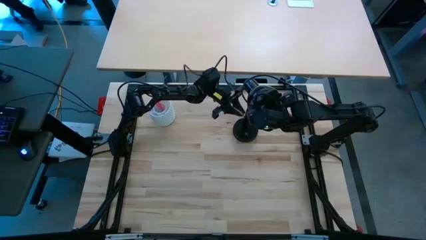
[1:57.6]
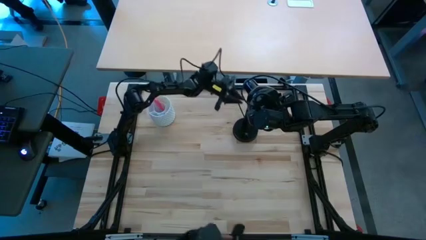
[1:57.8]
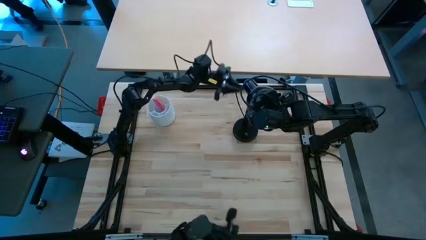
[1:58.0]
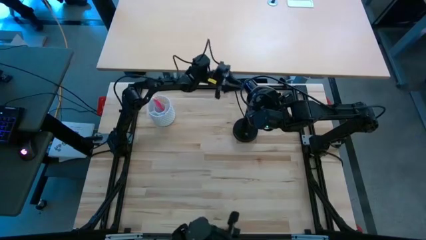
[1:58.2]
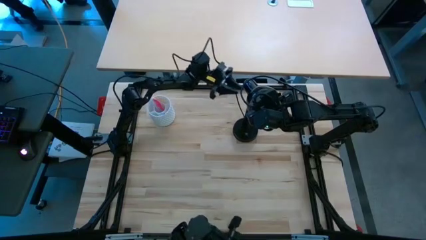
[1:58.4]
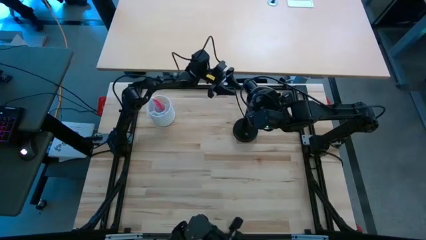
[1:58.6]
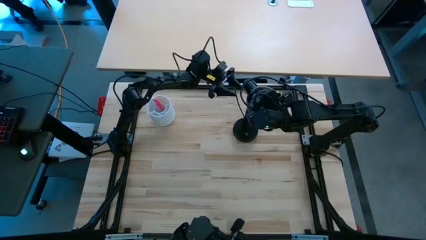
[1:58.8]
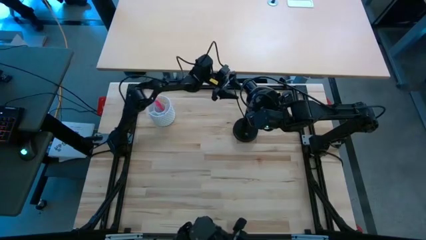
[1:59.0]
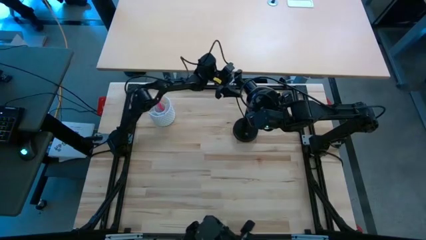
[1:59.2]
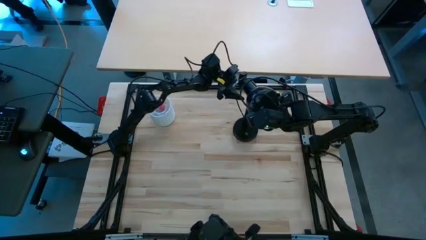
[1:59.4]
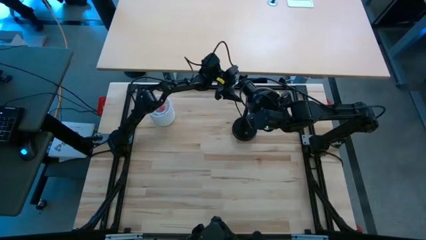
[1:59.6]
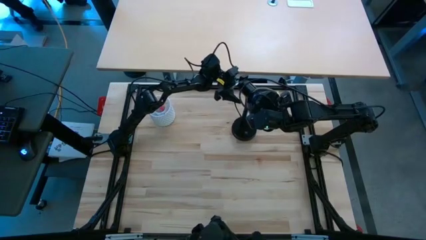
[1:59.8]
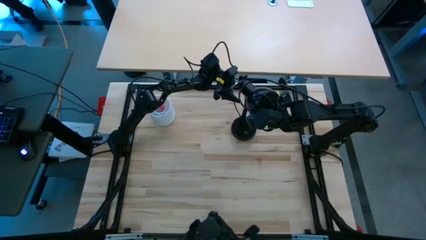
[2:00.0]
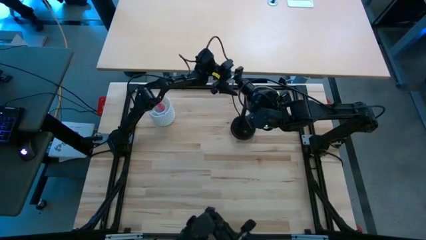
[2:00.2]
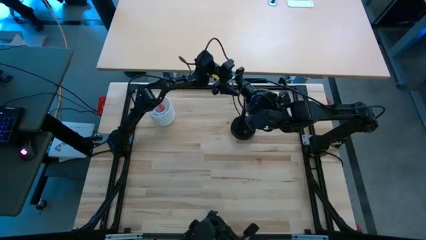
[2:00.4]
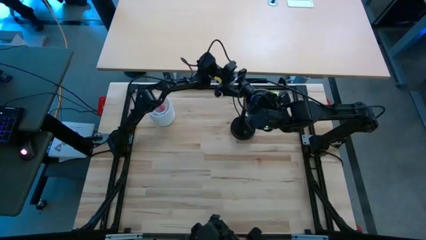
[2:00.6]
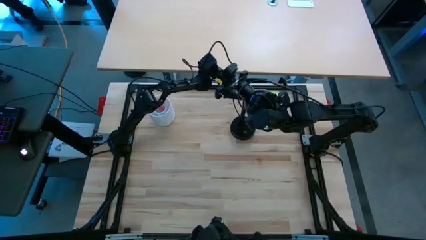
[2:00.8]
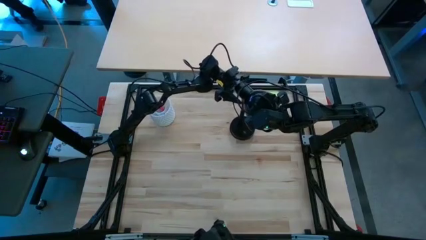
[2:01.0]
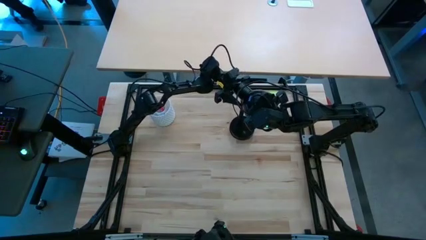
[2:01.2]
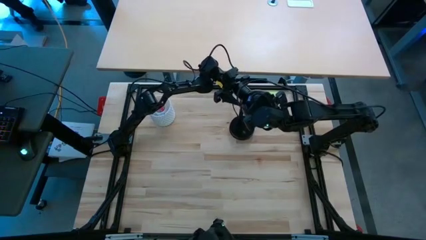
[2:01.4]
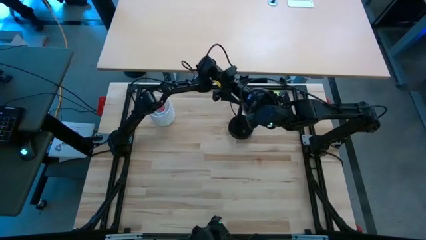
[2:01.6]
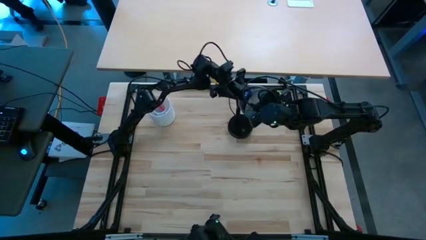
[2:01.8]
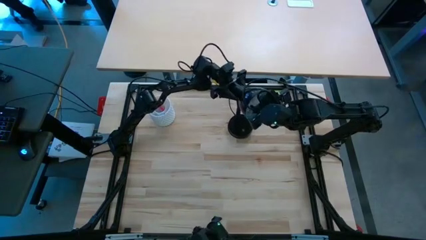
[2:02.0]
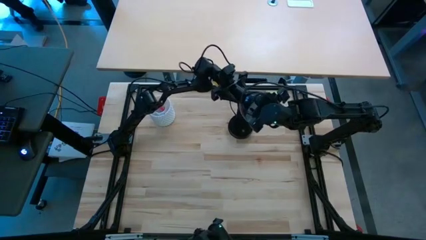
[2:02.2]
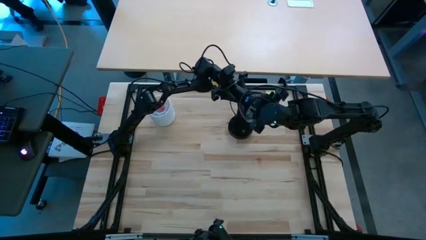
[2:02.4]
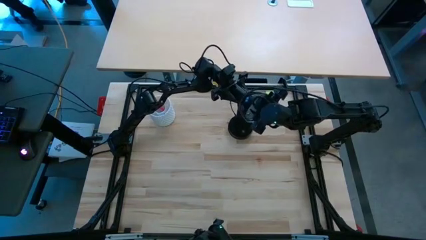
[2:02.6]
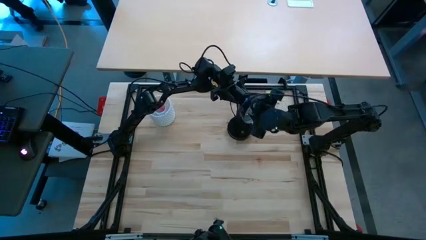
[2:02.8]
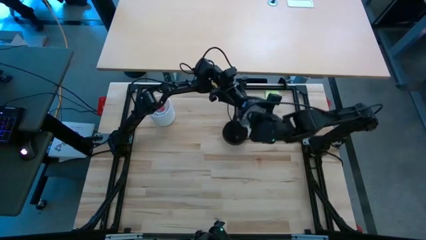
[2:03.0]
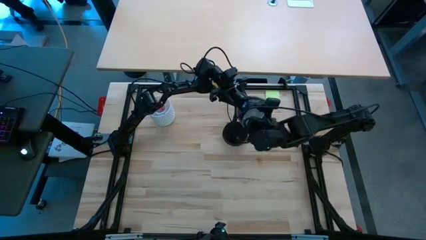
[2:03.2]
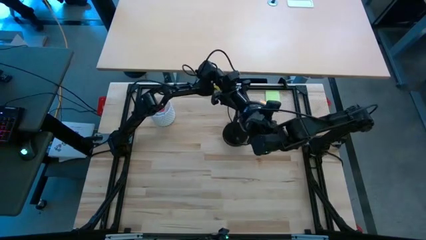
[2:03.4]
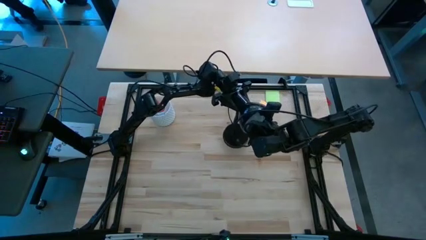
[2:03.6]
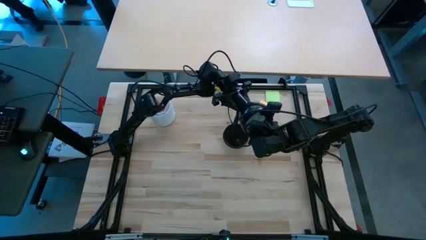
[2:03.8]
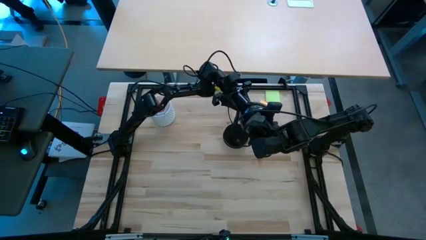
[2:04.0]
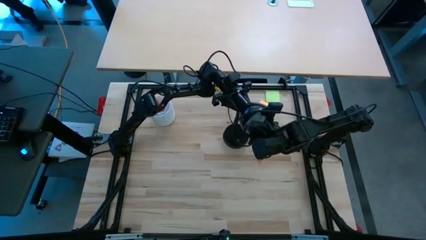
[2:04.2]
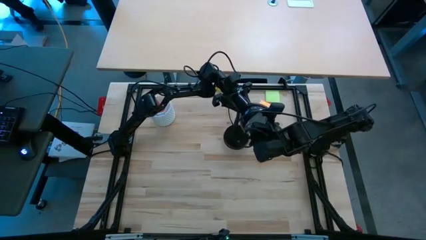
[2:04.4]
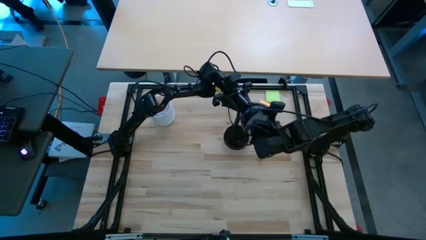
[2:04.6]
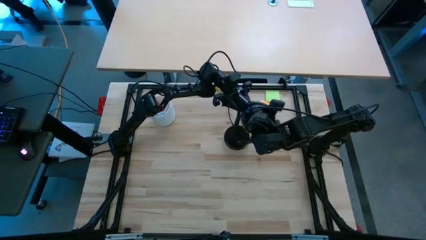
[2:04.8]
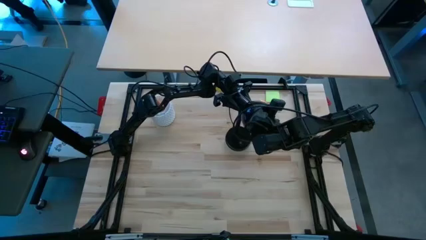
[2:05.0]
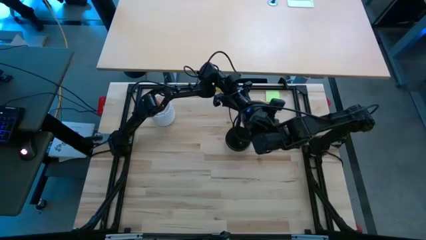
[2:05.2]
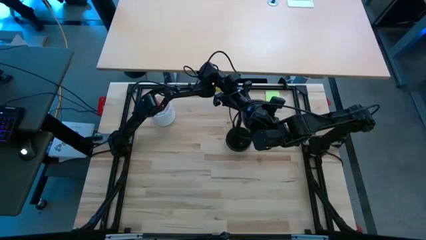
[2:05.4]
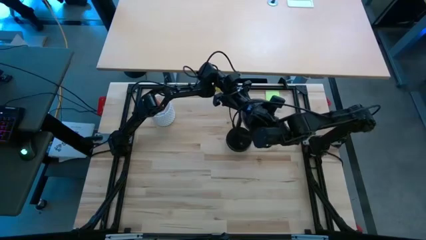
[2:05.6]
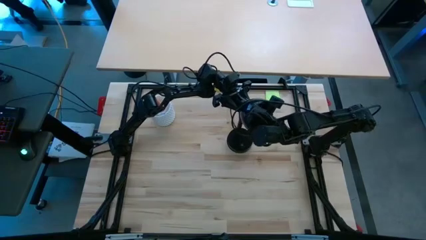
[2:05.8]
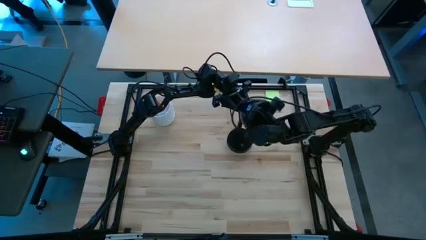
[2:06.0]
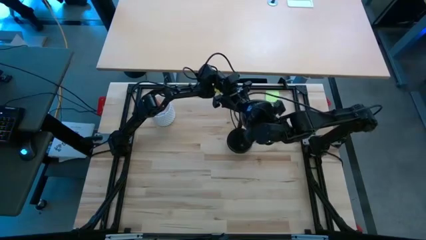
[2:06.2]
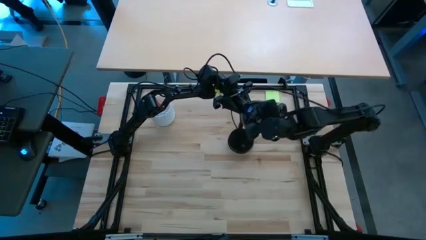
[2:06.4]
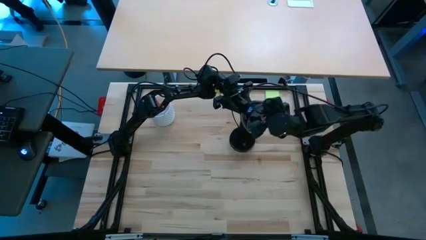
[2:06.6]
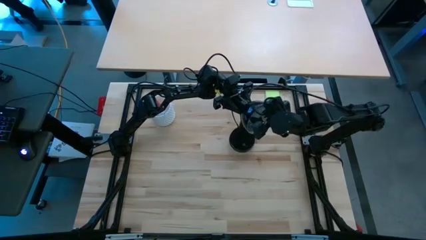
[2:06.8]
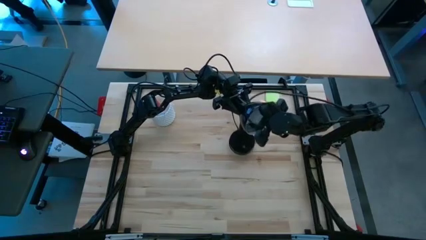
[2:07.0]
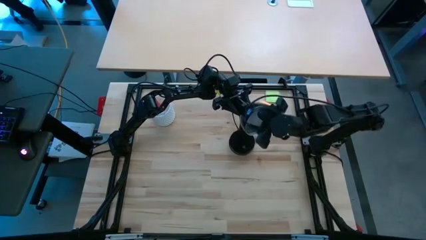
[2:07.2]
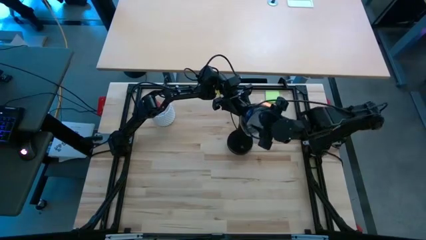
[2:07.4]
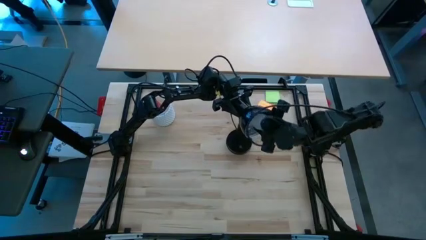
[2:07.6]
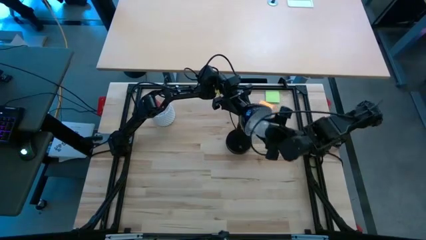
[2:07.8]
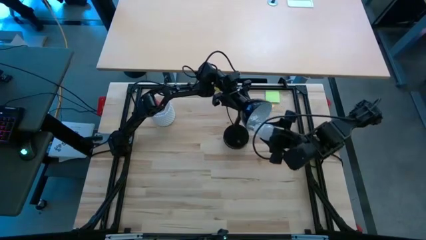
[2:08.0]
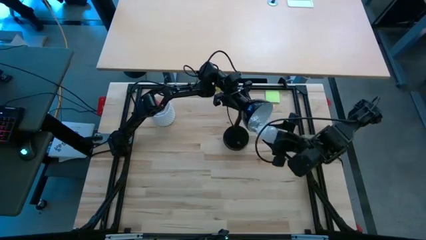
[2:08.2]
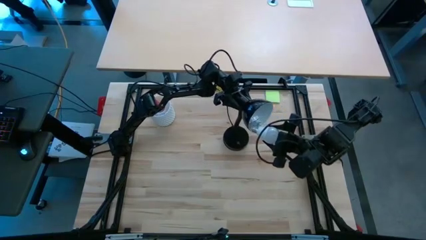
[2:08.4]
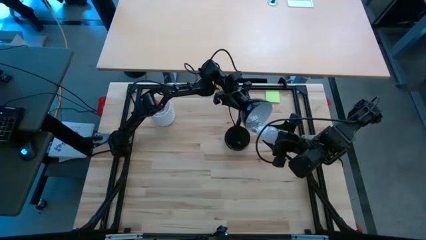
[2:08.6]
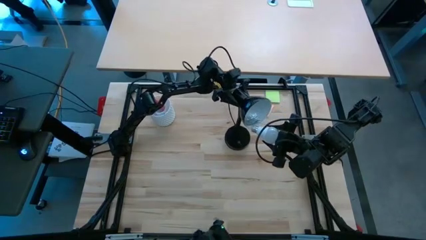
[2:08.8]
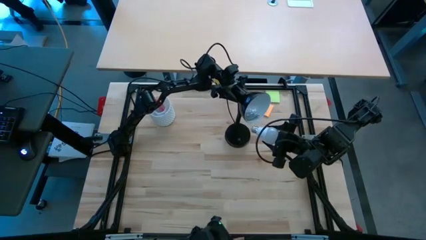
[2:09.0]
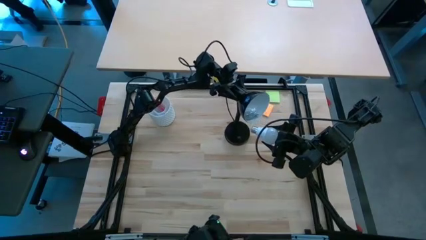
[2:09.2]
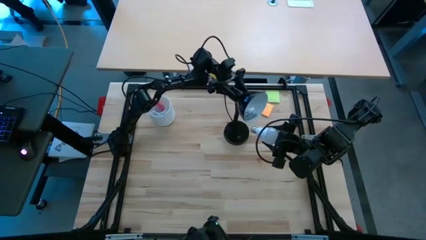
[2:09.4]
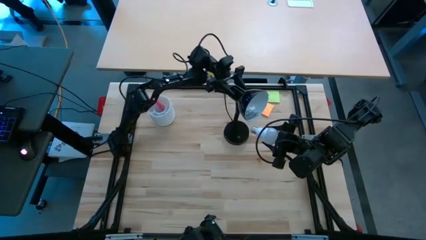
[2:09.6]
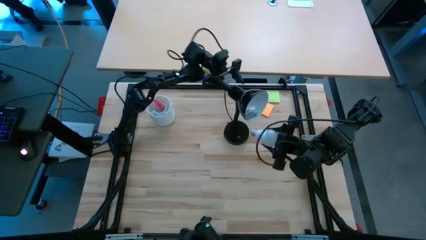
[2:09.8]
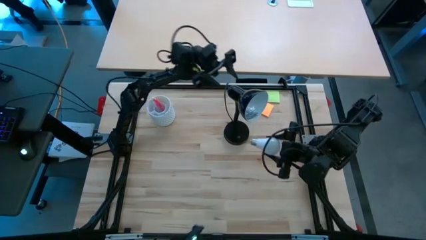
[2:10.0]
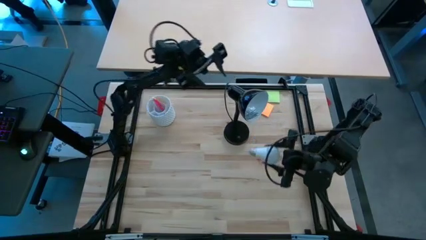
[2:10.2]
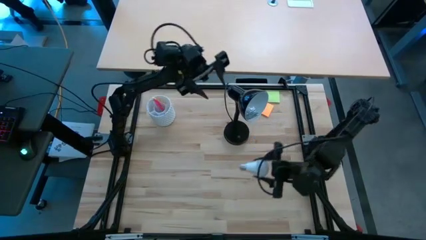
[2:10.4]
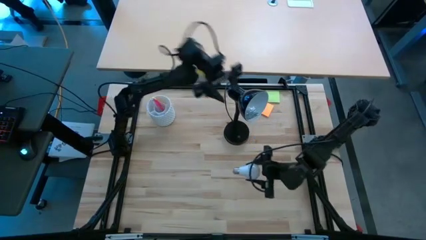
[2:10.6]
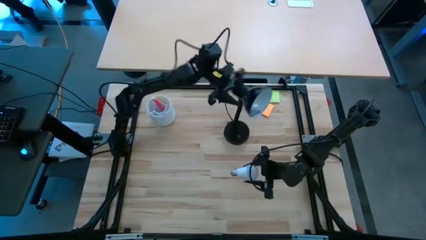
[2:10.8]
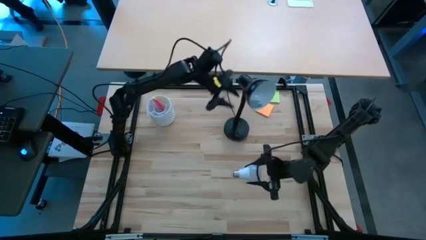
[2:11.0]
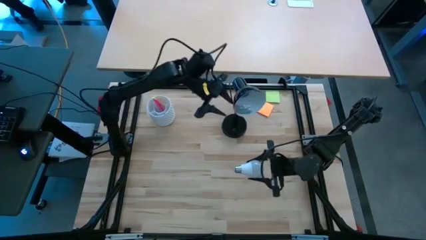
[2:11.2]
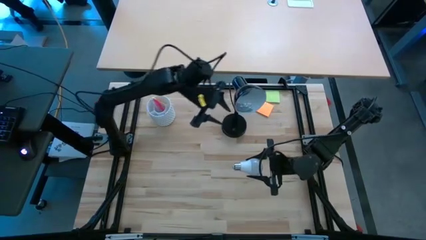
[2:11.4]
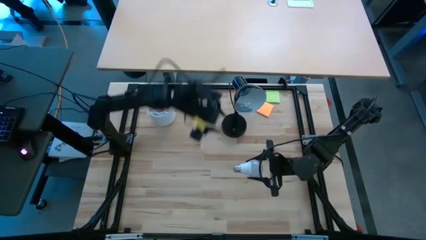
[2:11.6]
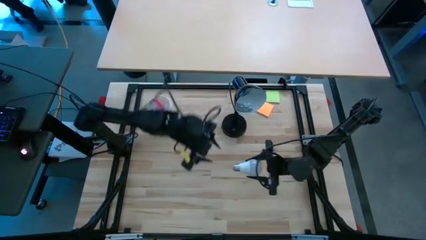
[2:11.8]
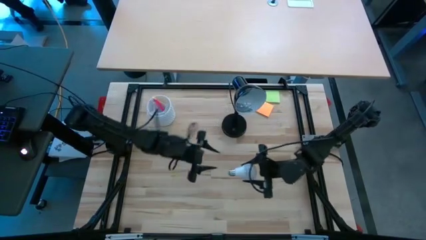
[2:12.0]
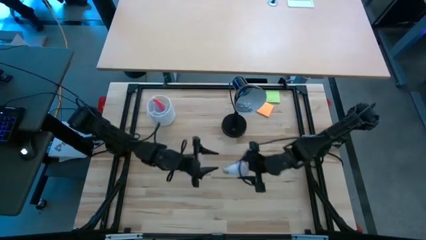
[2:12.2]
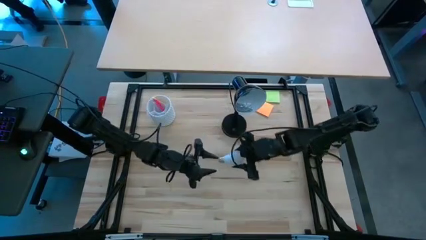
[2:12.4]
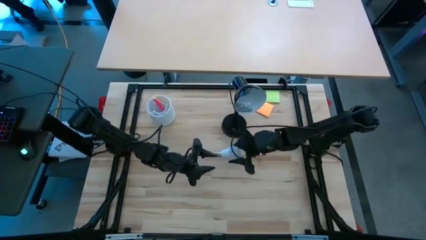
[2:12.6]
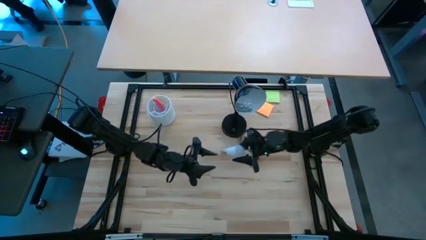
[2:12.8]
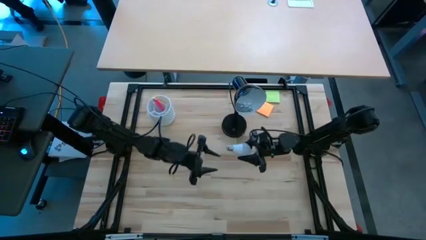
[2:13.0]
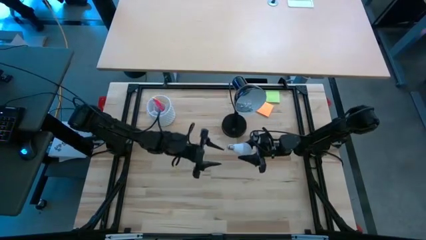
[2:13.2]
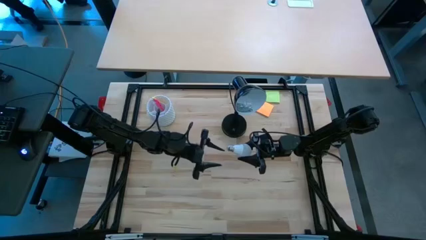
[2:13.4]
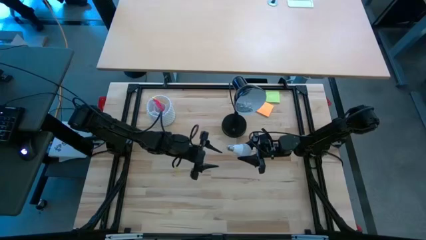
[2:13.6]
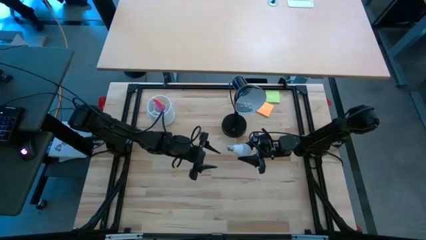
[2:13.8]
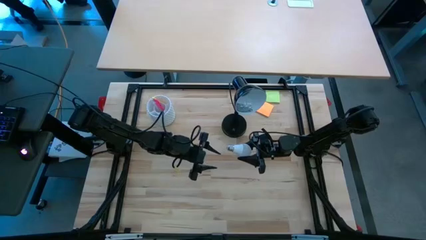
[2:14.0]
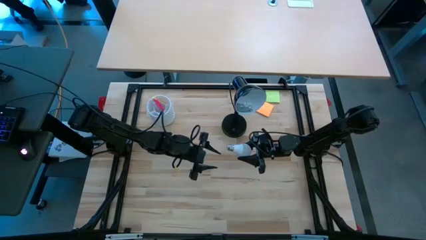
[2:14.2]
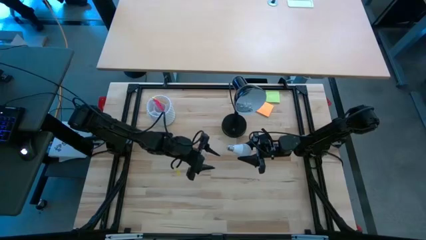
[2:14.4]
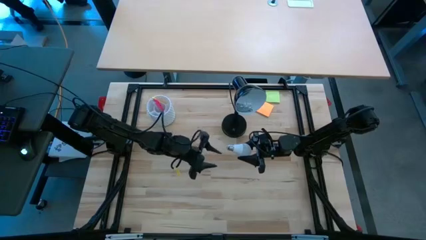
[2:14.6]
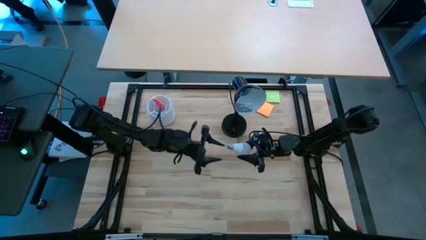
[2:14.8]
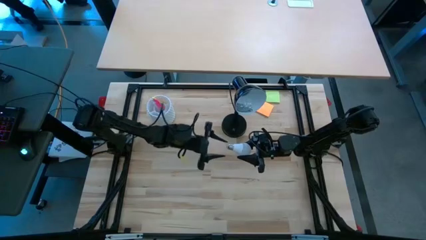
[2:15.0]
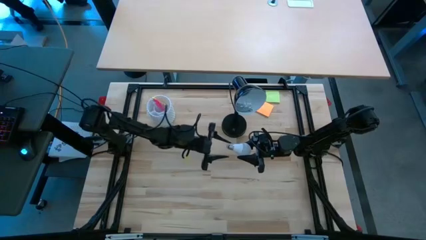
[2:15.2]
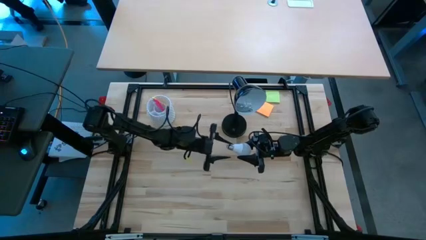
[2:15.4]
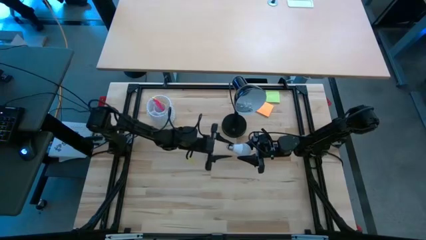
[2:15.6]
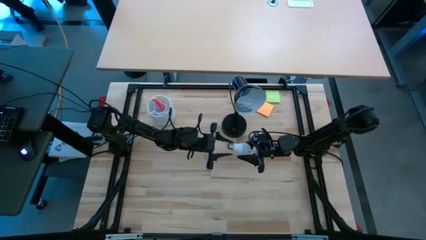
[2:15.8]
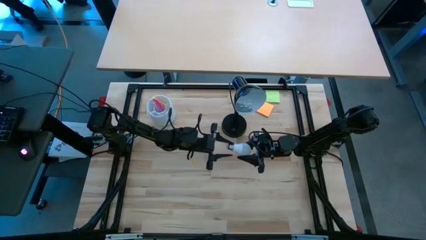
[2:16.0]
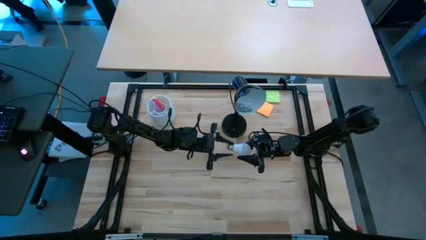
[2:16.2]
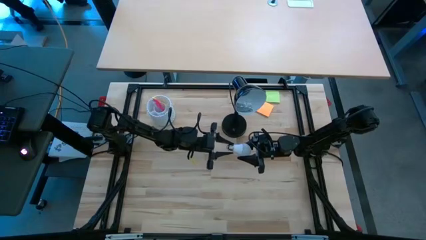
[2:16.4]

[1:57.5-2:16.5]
Task: Screw lightbulb
Insert the light bulb into the desk lamp
